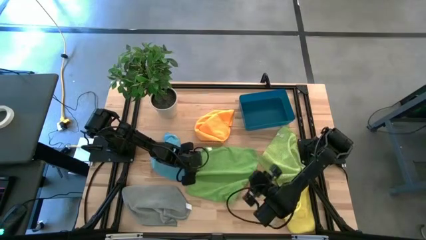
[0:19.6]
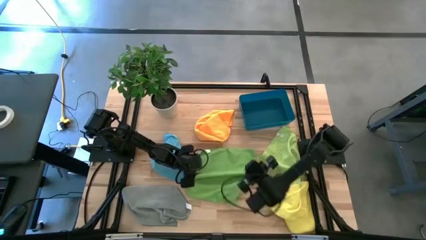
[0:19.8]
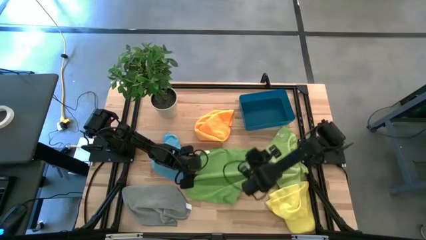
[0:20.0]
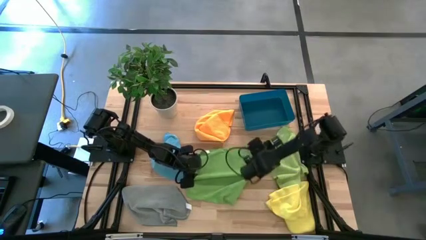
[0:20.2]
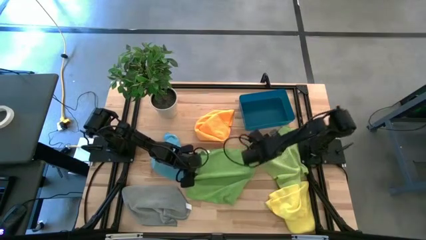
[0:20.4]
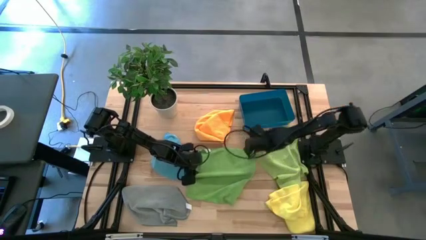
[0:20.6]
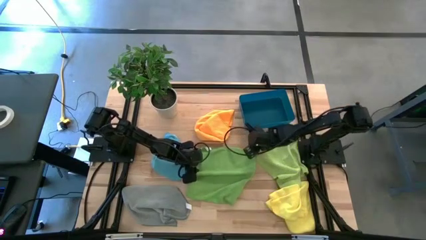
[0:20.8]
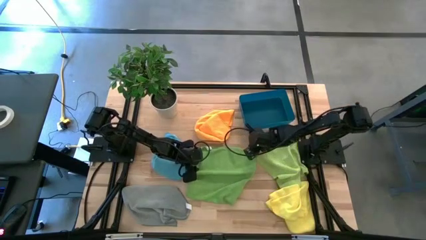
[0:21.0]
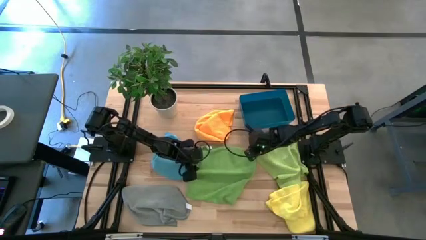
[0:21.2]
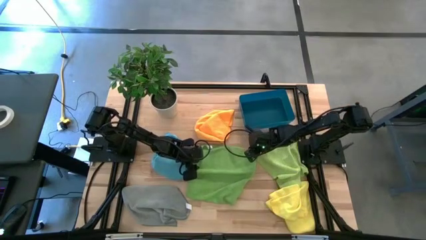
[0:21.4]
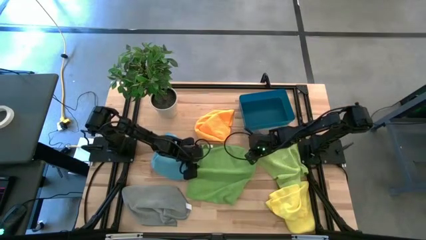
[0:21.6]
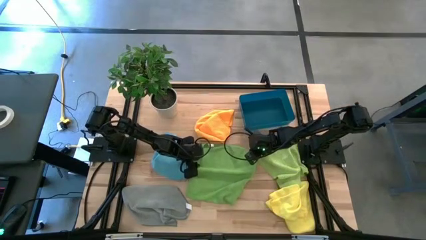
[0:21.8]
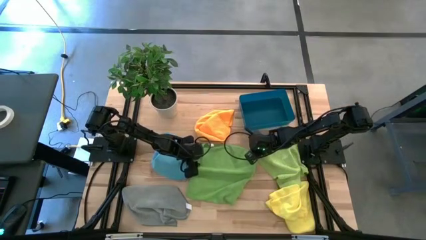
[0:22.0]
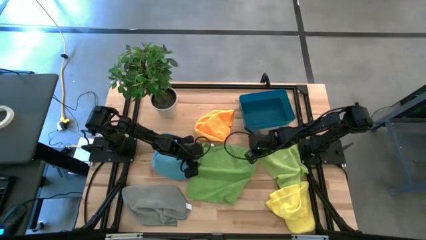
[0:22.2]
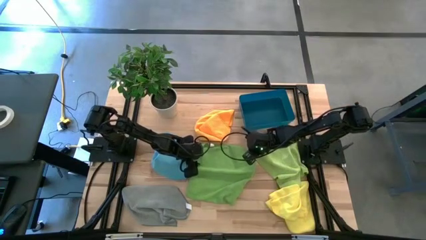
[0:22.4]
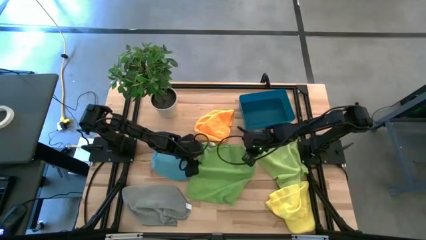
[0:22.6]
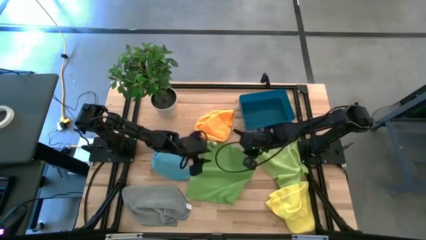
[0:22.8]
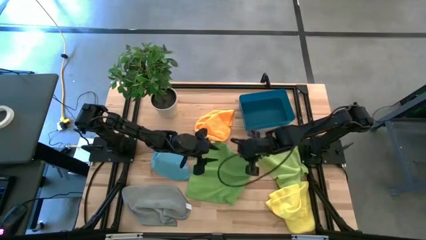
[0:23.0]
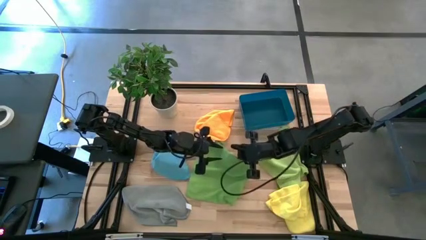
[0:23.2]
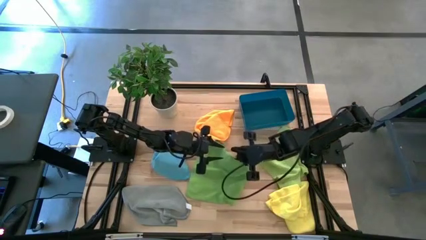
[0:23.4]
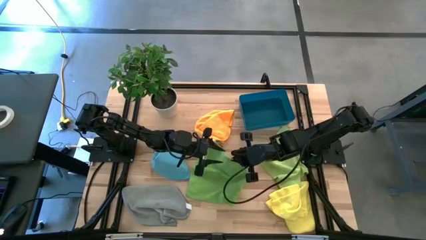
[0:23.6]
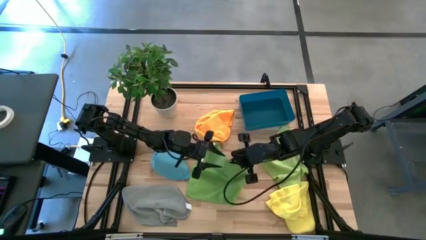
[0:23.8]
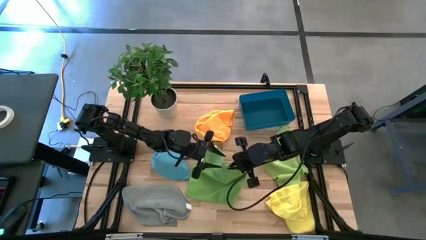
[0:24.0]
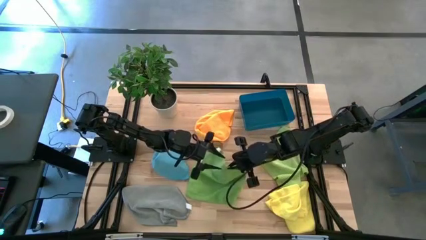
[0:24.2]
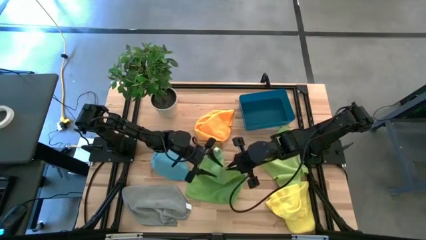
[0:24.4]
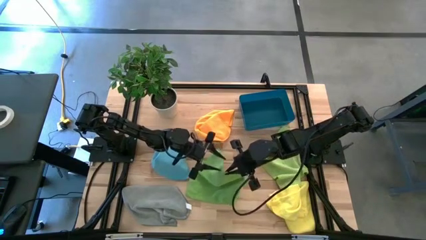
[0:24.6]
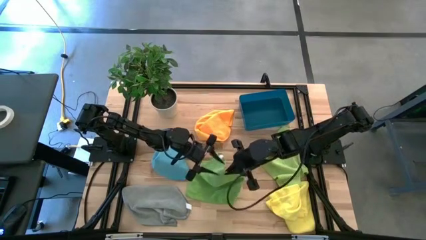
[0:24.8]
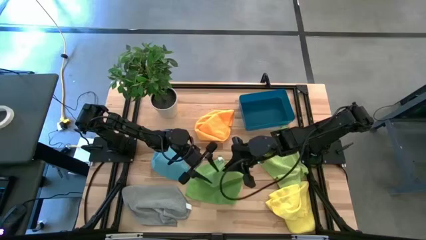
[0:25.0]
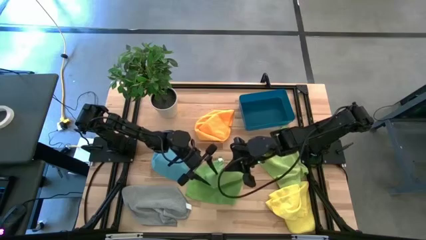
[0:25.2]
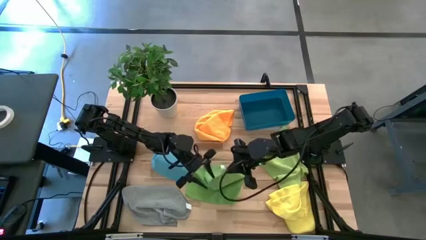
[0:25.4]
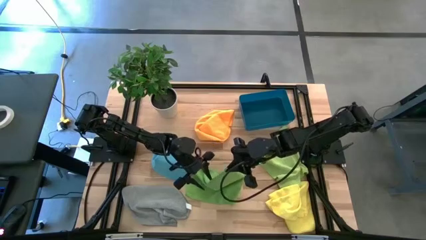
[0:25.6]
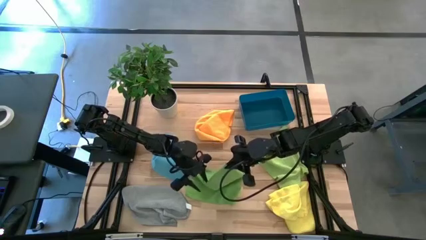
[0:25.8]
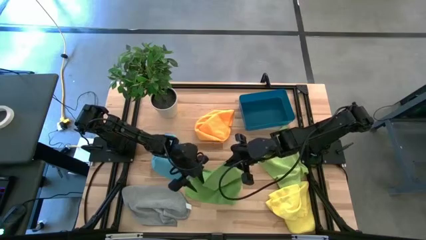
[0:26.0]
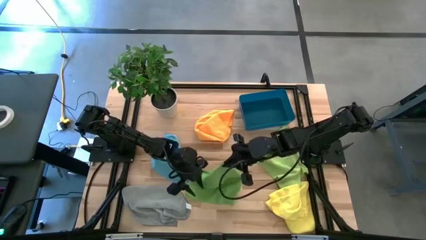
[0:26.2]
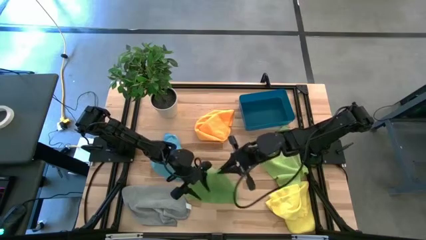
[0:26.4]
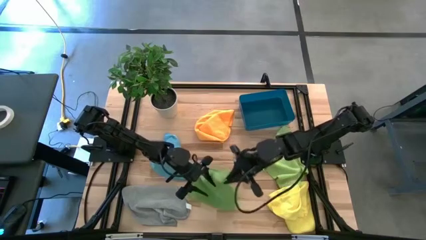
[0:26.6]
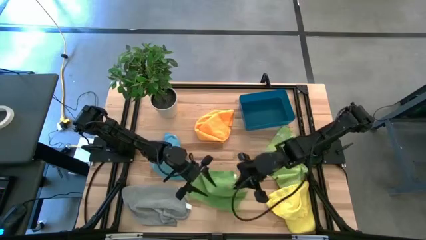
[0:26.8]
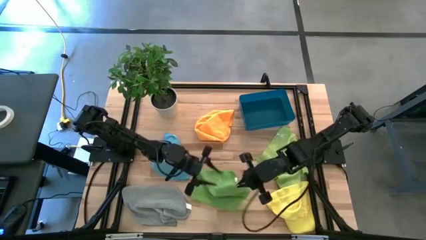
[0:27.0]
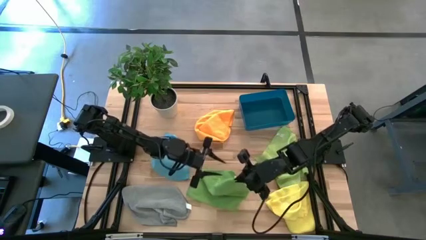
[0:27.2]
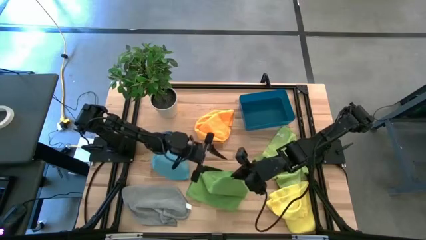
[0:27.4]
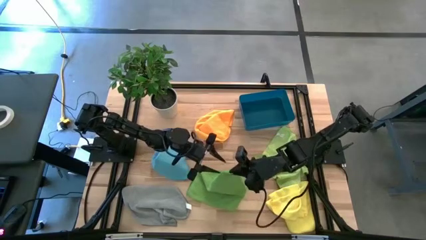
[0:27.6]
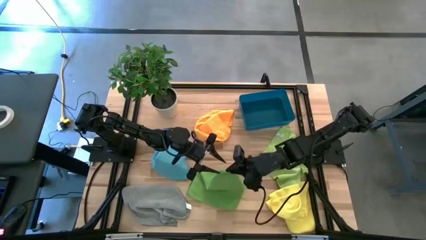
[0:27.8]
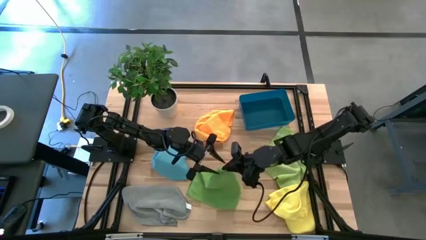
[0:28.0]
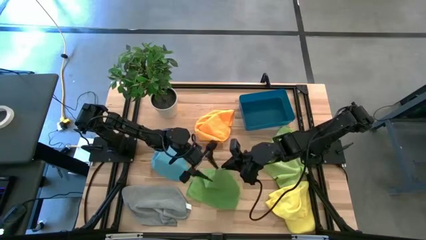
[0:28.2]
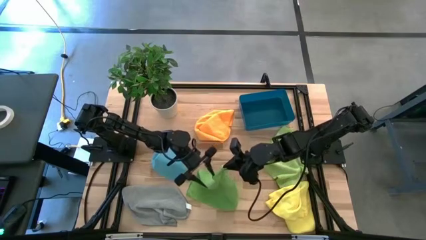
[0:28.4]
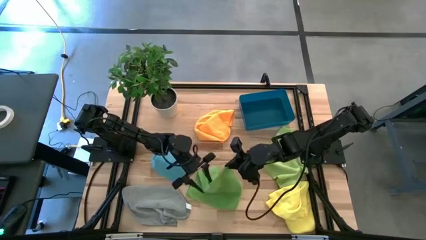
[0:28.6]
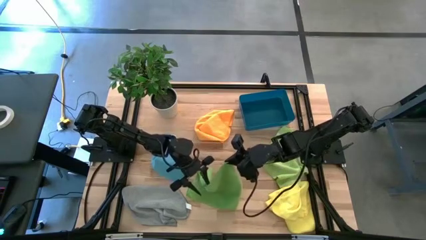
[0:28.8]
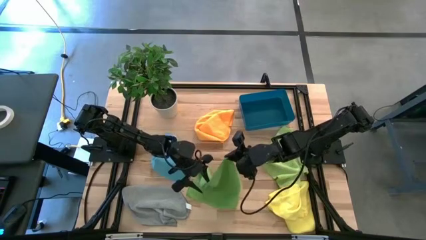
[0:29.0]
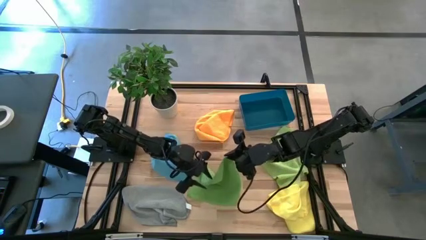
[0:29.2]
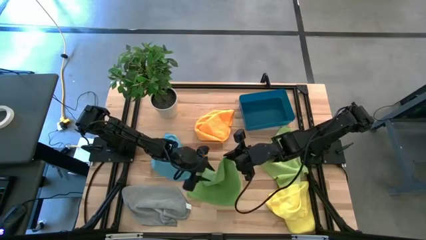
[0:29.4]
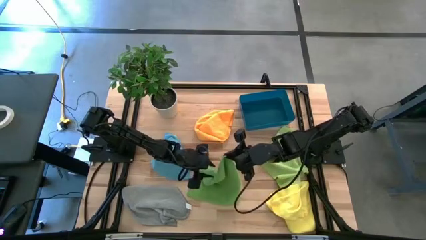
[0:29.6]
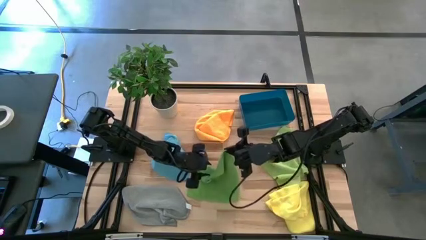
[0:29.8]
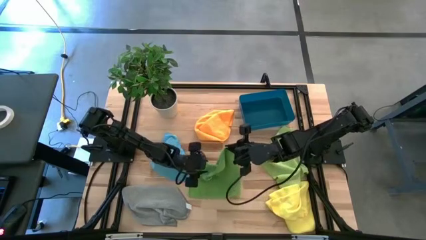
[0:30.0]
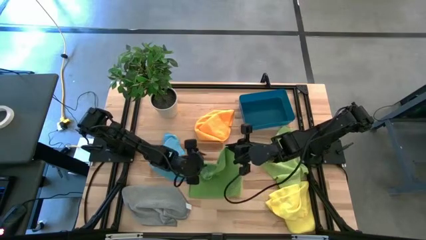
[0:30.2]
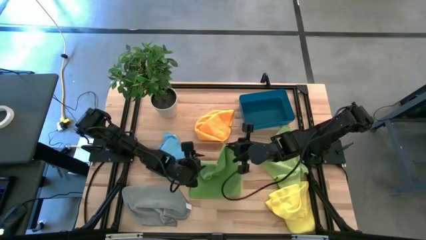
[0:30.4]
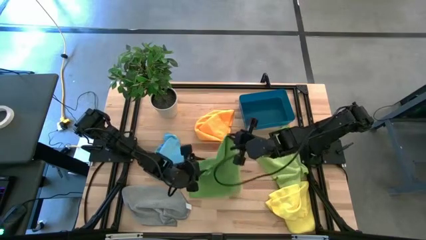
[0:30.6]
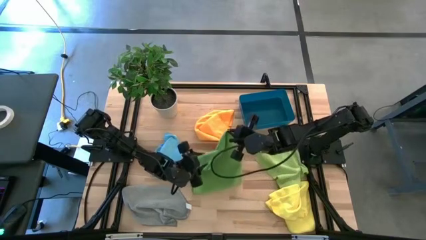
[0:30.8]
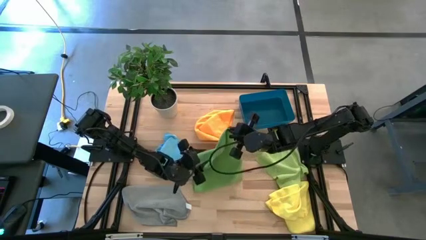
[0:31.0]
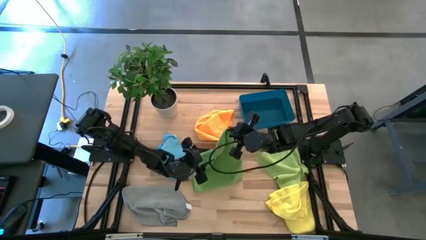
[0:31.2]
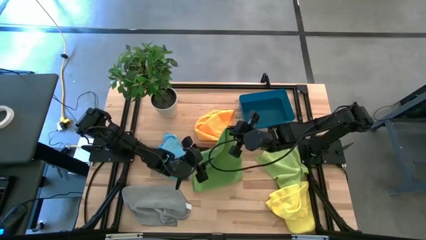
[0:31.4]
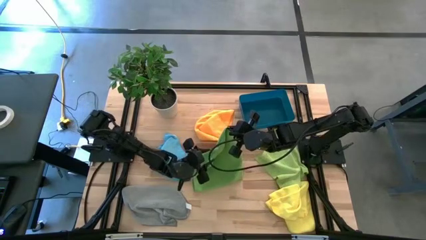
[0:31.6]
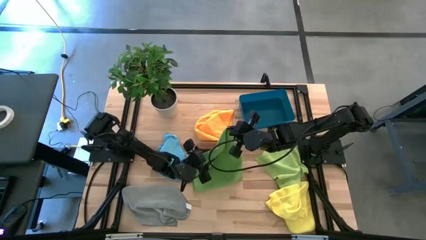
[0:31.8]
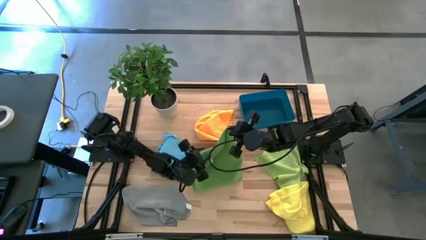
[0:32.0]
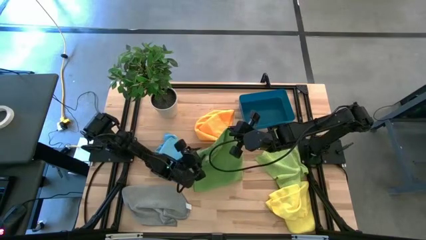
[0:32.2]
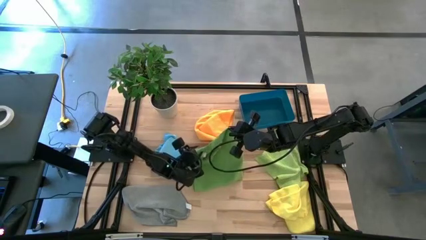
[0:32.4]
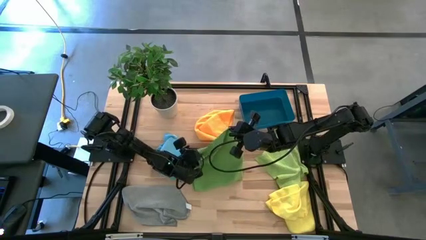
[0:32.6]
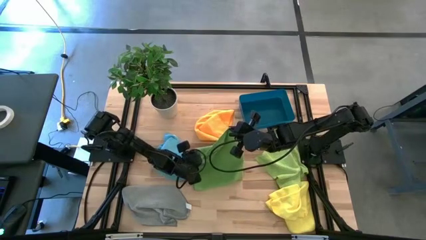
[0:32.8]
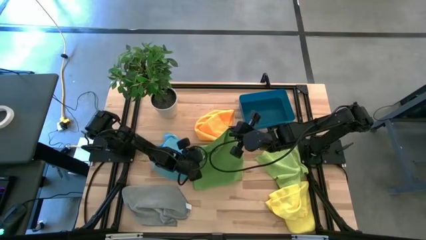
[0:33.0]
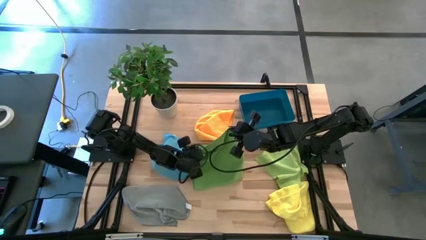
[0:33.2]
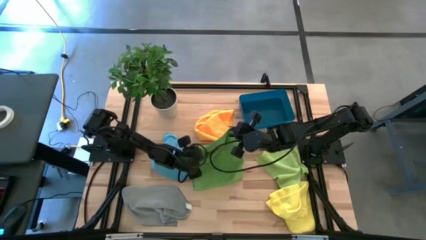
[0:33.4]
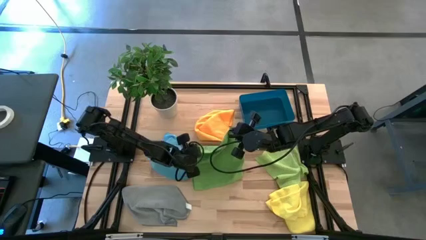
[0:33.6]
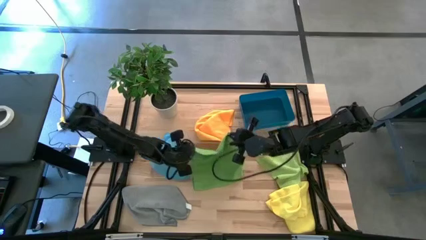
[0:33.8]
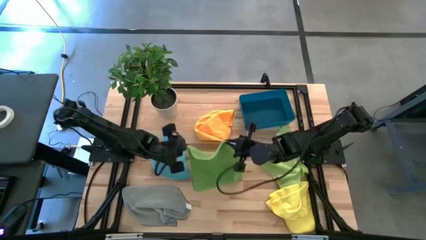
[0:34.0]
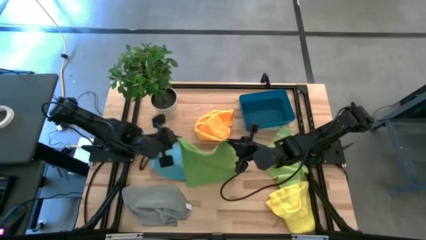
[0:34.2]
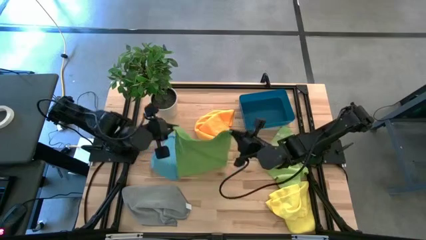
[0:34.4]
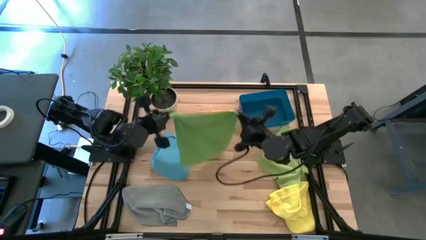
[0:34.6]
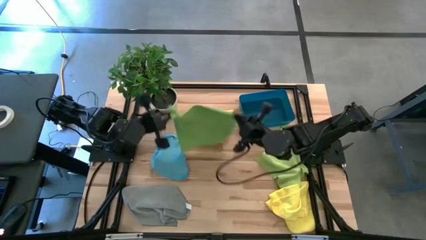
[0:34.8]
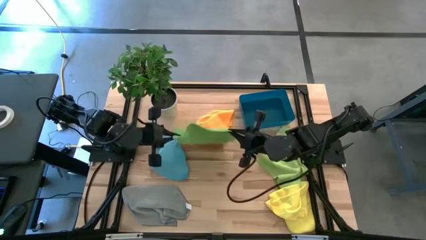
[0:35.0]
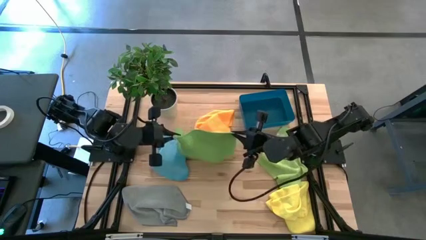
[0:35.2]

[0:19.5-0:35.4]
Task: Fold microfiber towels
Fold the green microfiber cloth

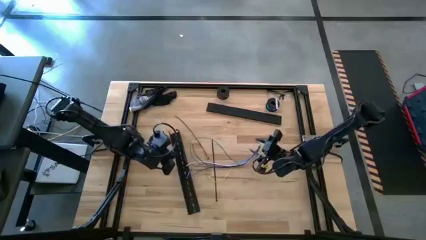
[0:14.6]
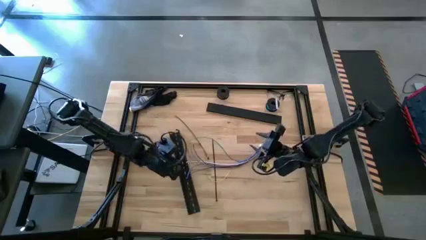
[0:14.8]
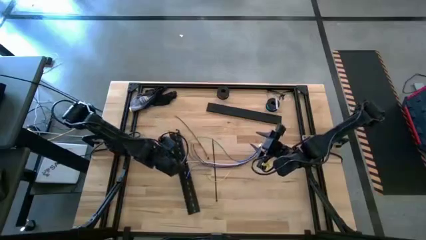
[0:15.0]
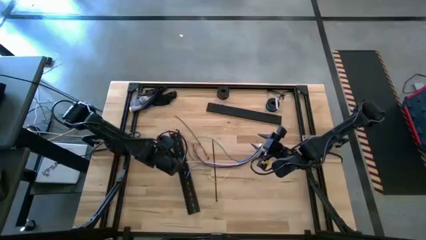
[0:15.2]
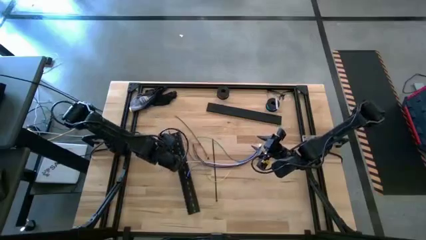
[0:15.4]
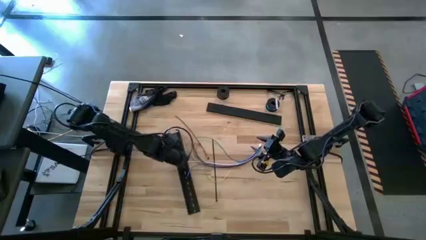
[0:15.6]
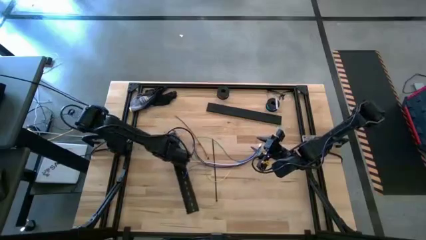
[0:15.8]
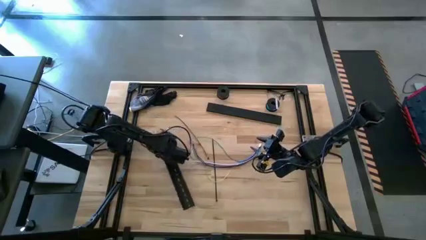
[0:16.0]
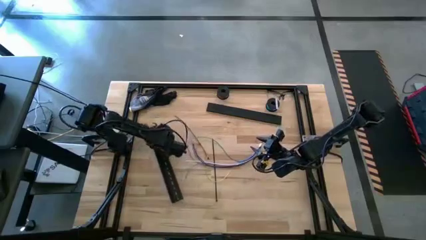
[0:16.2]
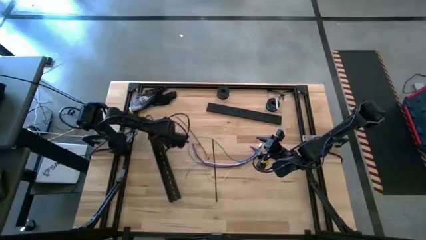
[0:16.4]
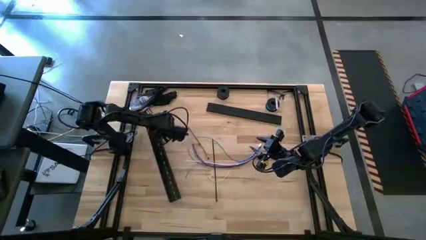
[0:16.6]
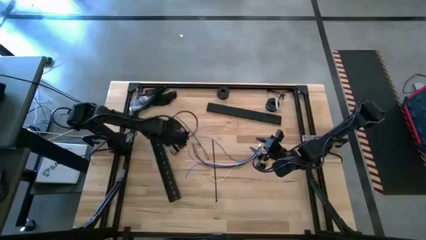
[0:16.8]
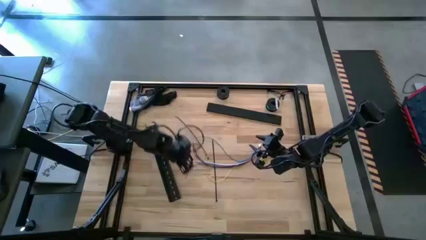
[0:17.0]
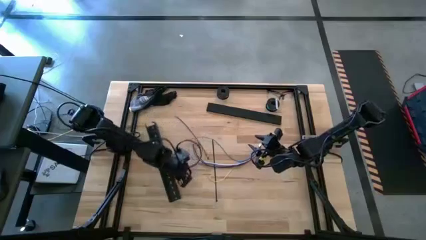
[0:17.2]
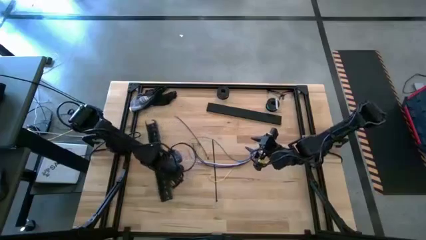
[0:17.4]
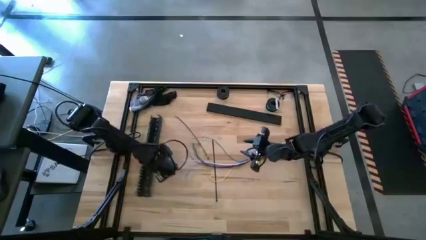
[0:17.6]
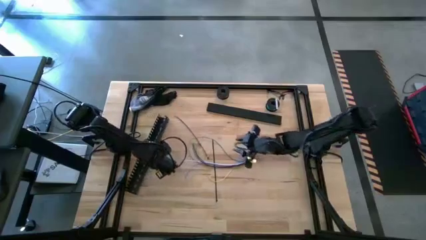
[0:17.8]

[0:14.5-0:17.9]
Task: Ziptie cables
Move the cable duct to the middle left of the table
